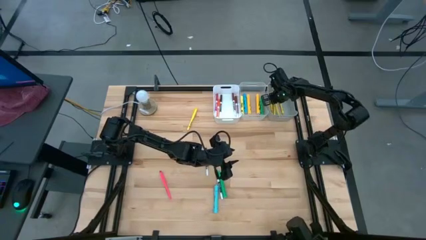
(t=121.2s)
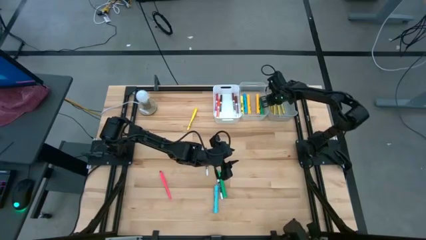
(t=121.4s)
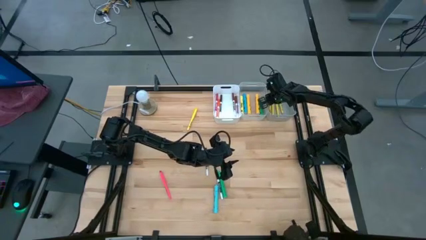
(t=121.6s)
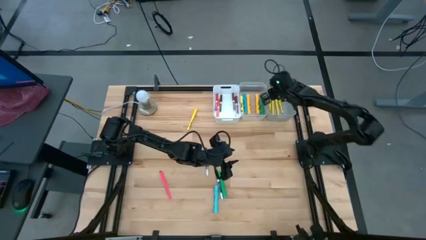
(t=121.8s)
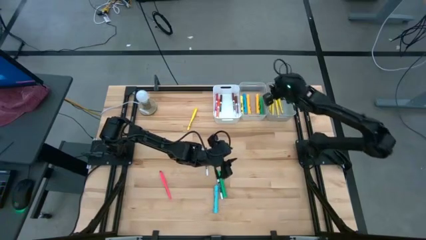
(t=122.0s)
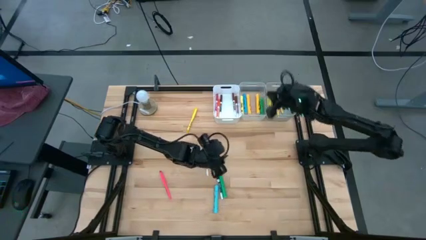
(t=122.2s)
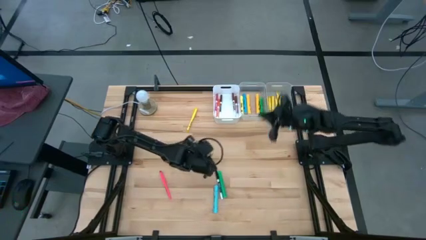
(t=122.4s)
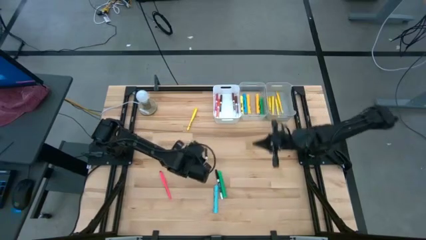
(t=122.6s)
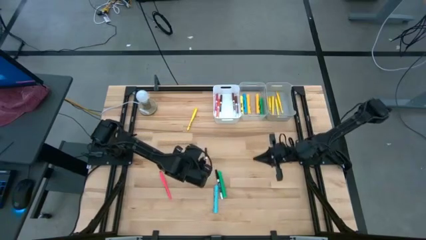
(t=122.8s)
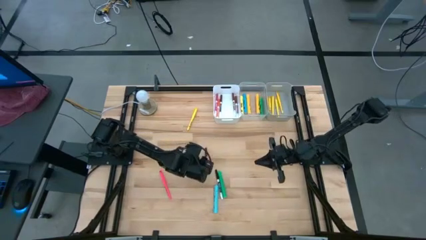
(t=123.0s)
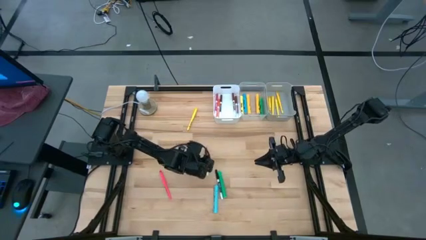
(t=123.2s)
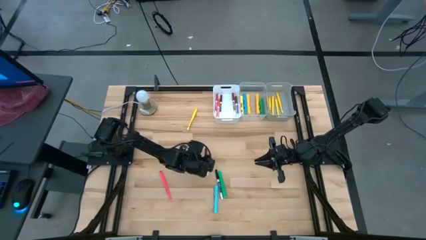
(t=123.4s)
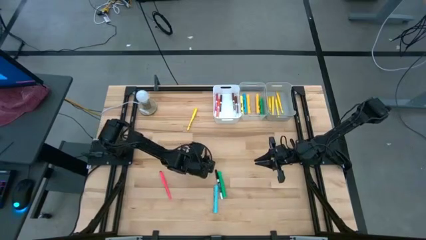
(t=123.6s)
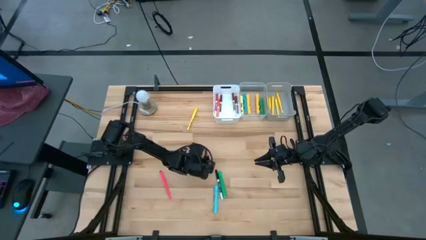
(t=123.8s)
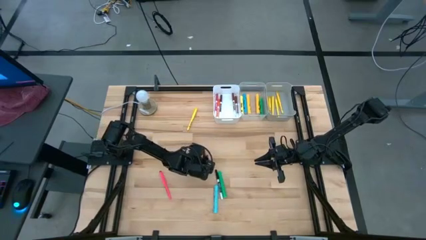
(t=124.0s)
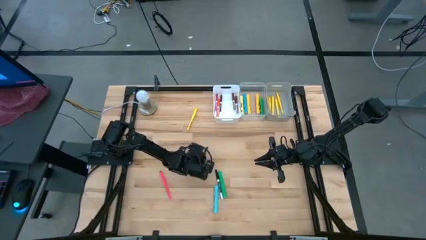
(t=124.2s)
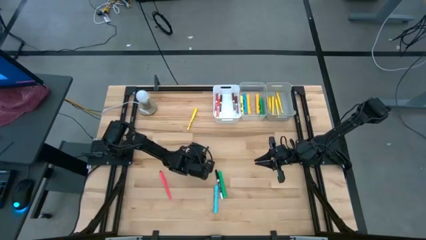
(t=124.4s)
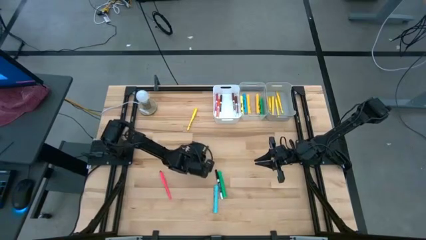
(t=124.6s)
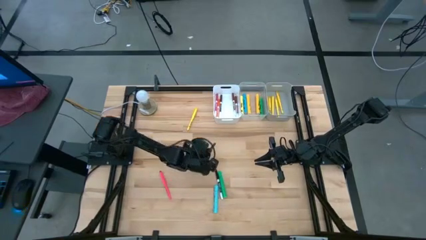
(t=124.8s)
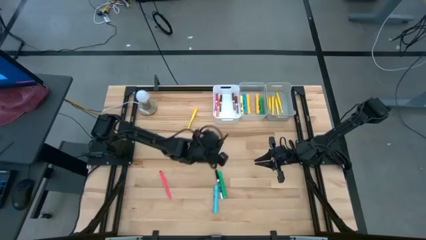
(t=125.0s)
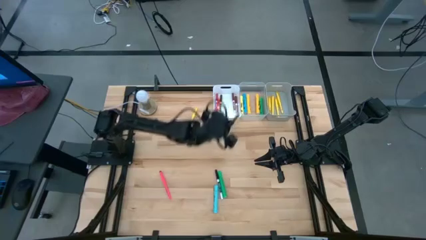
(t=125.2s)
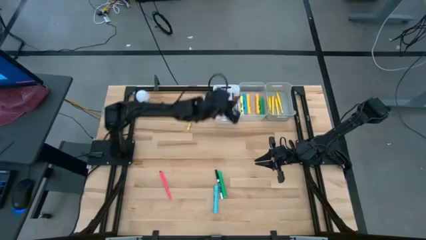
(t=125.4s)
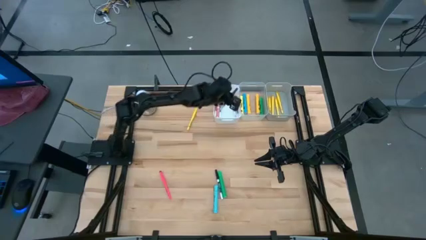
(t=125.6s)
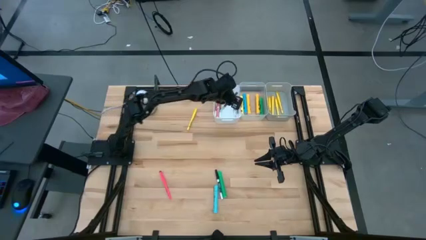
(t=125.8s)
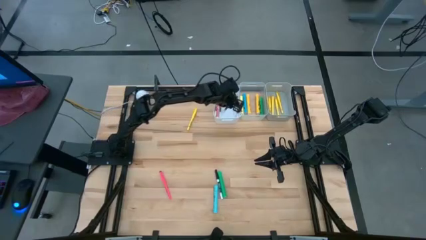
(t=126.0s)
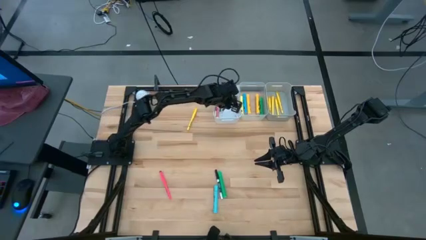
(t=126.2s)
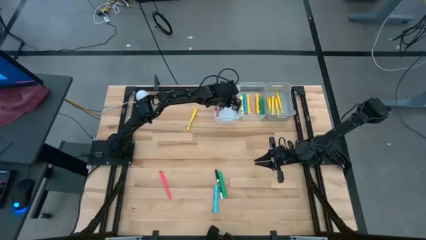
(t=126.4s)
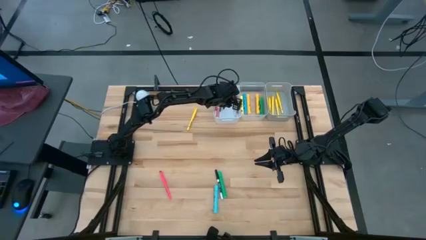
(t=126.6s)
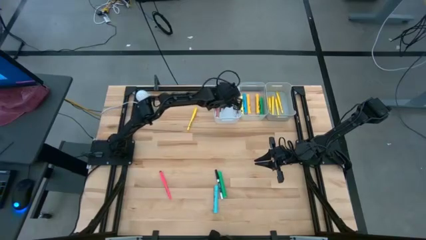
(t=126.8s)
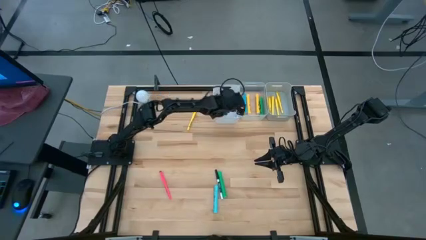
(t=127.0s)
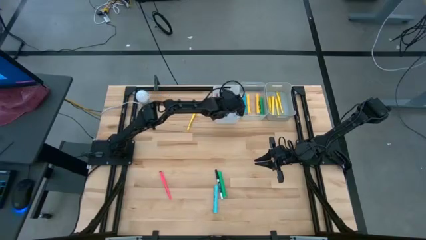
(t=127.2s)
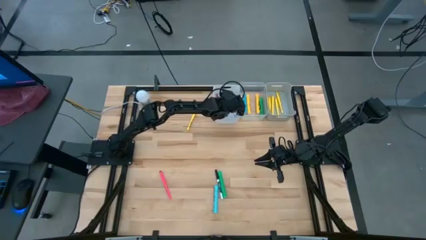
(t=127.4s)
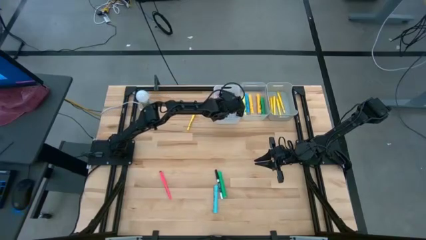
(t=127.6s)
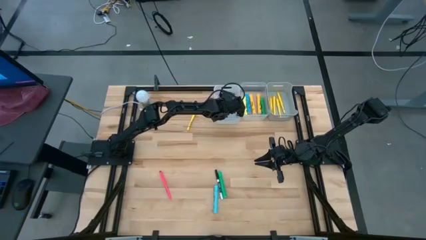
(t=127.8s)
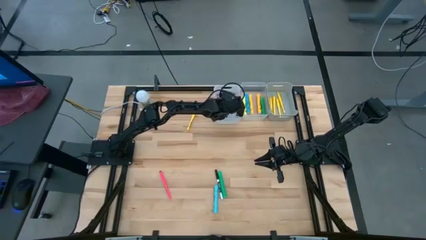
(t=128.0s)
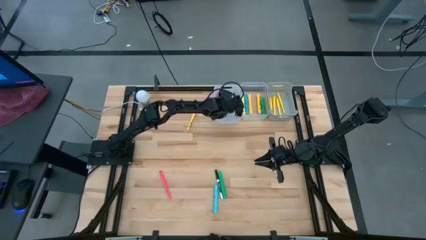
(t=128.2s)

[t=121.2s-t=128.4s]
Task: Pick & Place Markers
Put the dark brown marker pen into the white bin

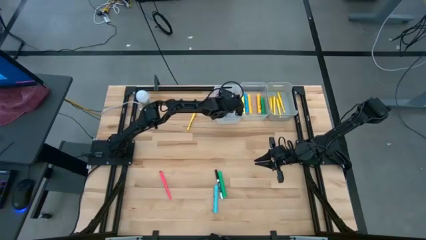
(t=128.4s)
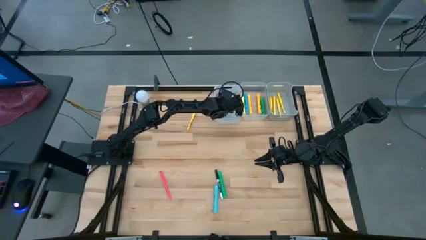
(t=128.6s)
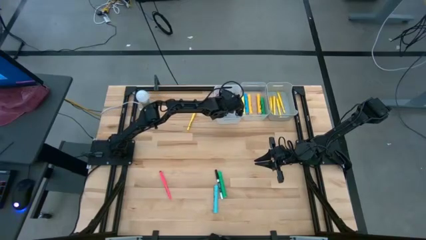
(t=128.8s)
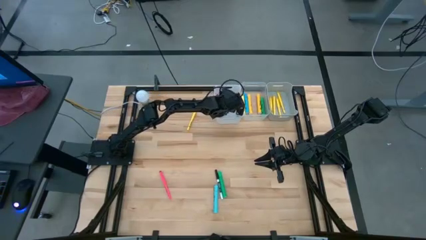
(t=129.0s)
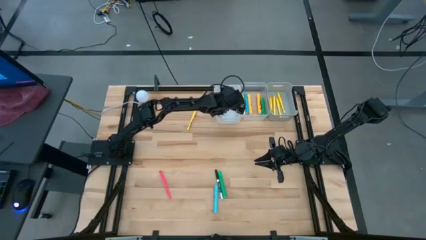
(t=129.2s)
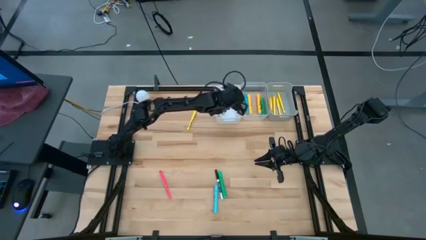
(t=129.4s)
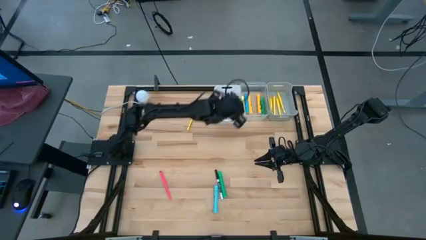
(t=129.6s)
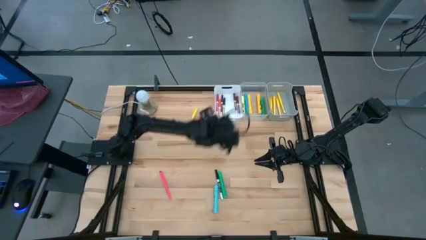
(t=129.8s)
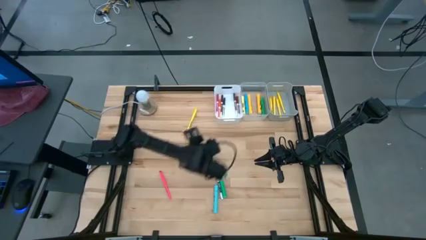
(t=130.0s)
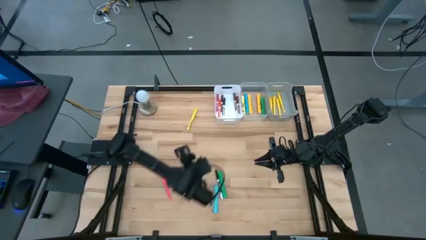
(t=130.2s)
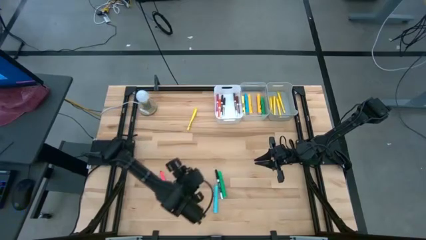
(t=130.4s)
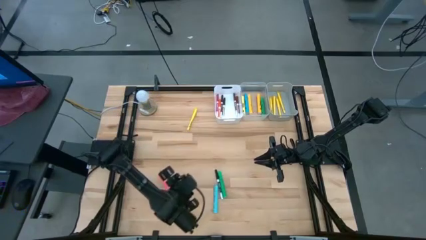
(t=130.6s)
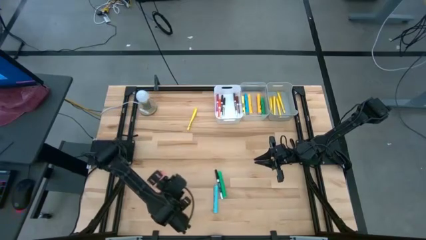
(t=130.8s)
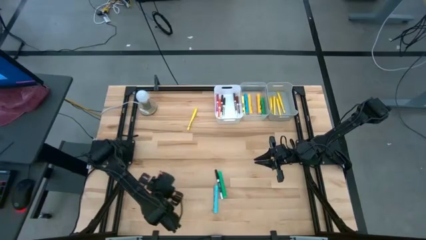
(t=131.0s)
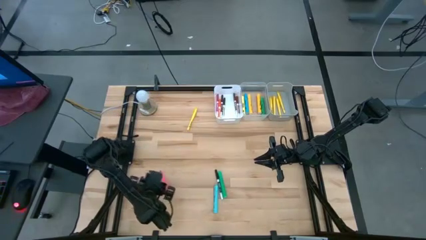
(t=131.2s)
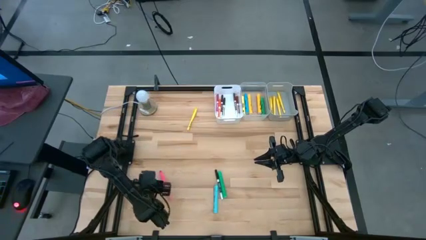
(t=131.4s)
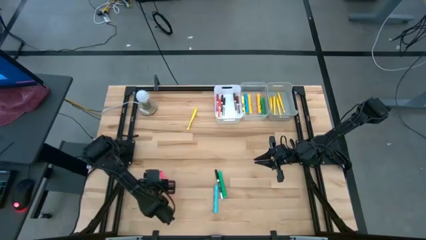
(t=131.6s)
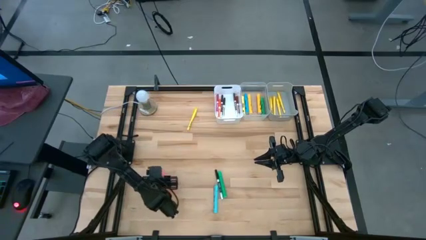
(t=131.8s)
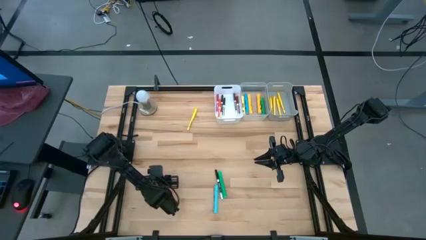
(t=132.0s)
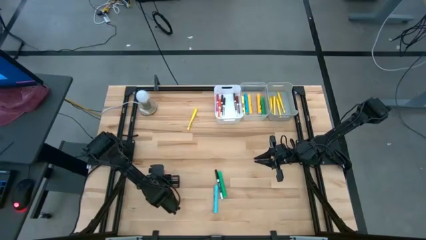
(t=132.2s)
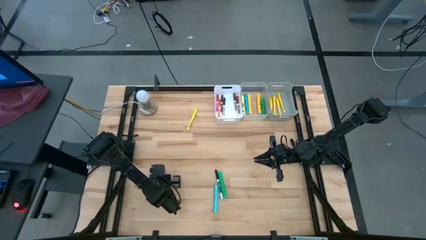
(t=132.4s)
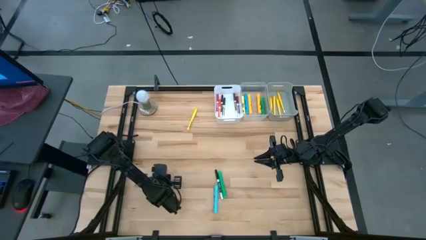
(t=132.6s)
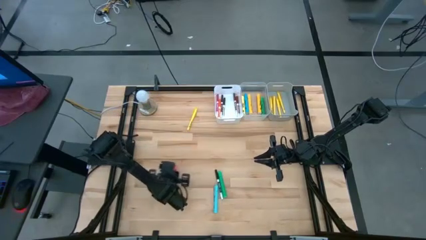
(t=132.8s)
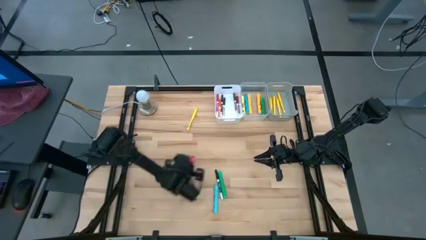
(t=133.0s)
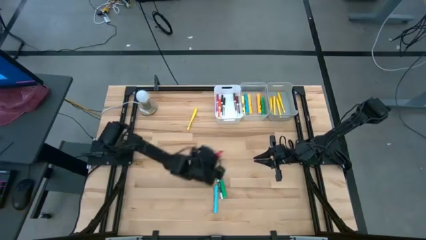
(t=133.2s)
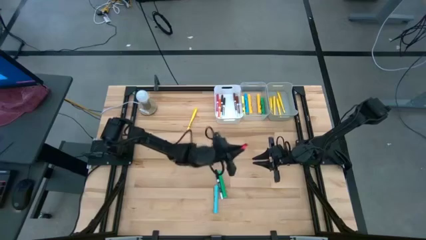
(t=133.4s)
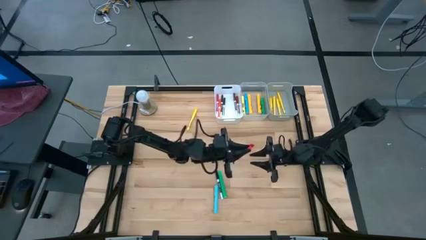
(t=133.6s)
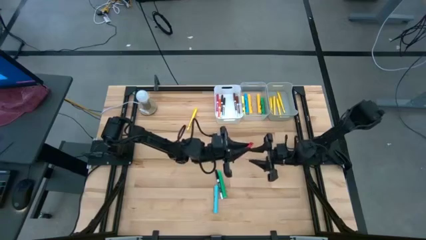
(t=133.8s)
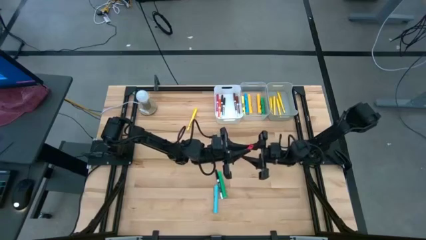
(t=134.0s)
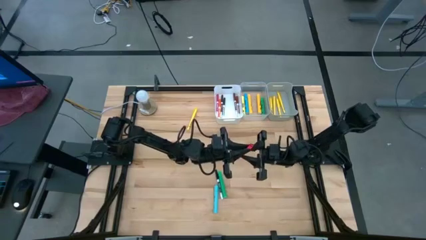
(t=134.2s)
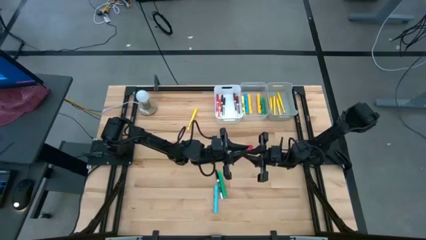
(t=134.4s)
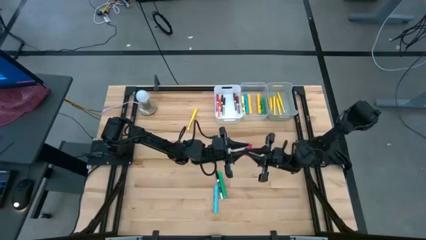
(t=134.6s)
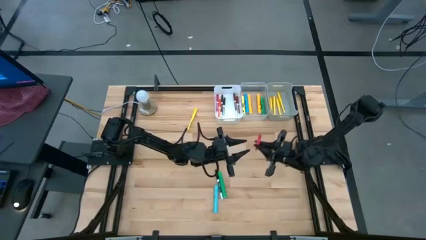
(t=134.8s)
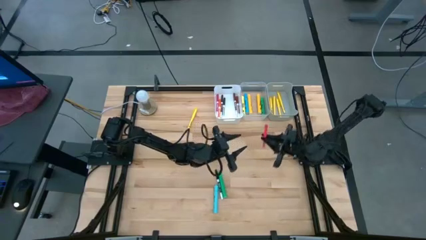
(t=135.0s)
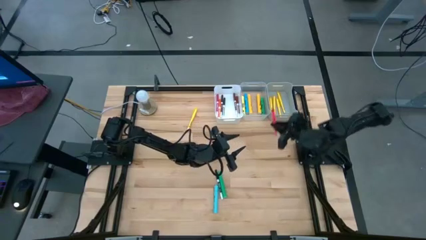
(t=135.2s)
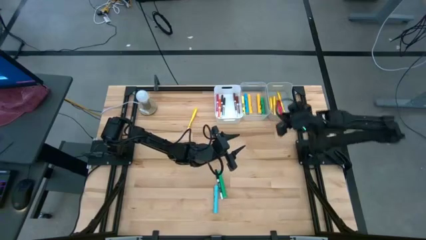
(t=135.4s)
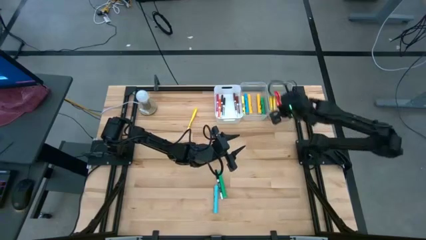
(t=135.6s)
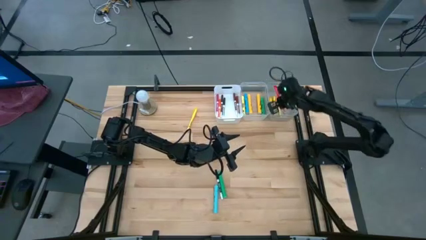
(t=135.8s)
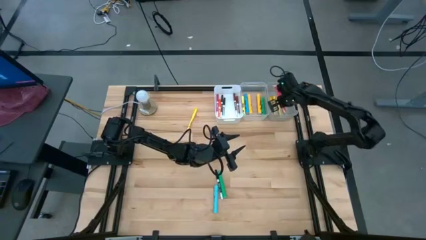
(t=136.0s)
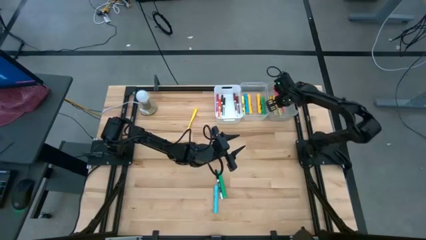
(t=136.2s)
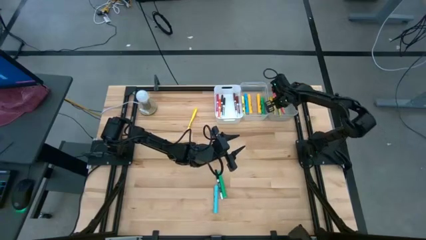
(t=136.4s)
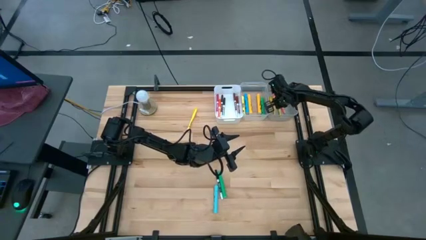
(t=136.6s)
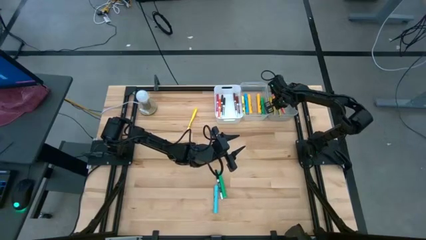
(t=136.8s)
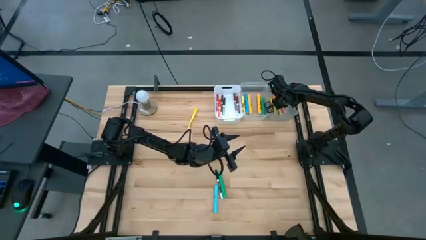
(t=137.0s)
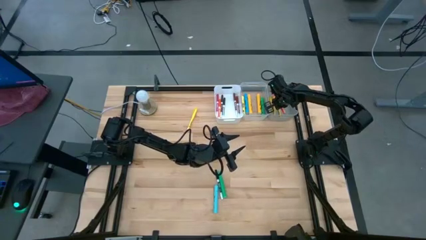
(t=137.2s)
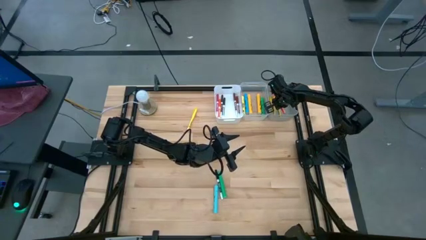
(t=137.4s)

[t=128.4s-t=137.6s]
Put the pink pen into the gray bin

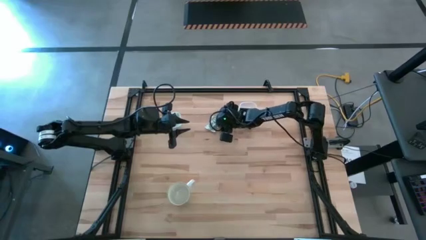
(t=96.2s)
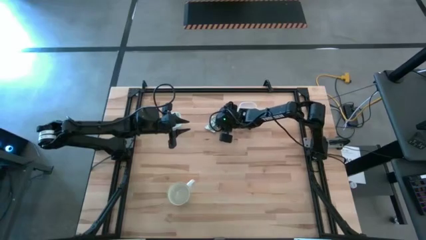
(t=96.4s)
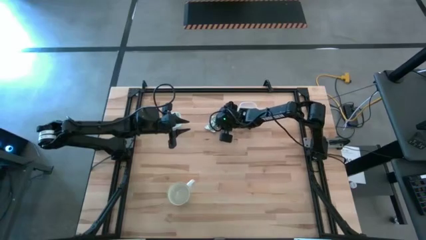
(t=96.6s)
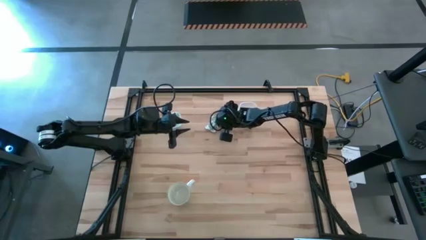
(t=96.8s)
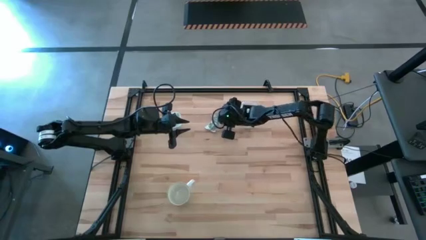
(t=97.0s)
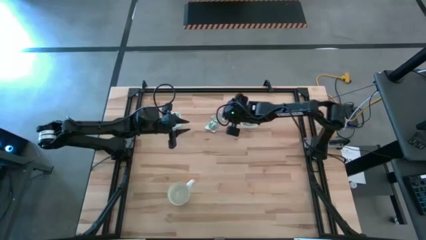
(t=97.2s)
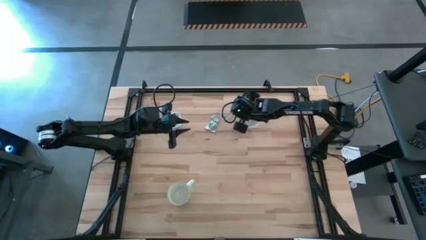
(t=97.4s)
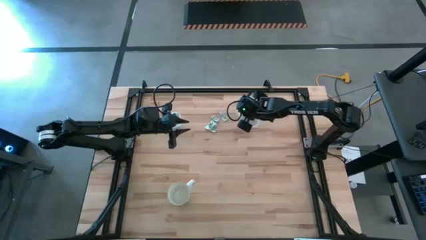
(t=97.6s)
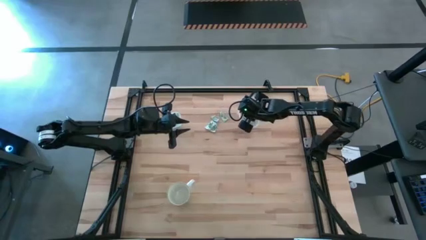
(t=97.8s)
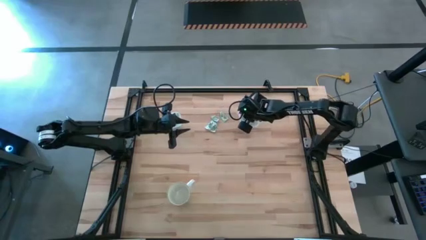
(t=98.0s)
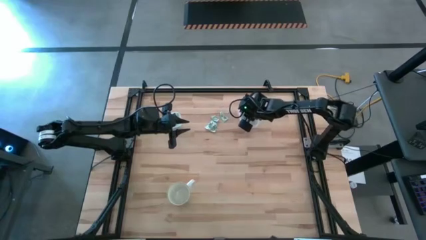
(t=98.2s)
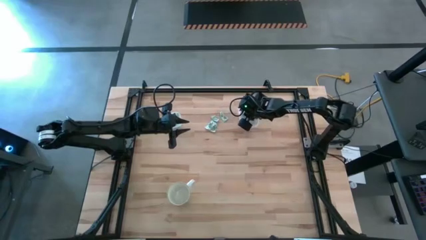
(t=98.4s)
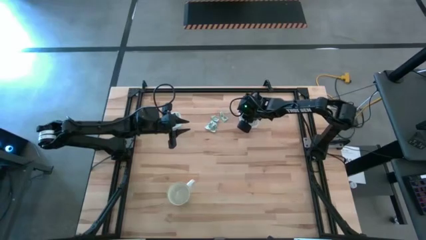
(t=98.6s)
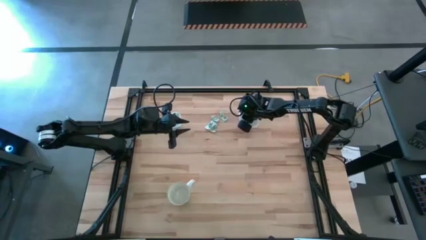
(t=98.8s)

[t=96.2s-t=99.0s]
Task: Pick and place items into bin
Put the green stevia packet into the rectangular transparent bin
